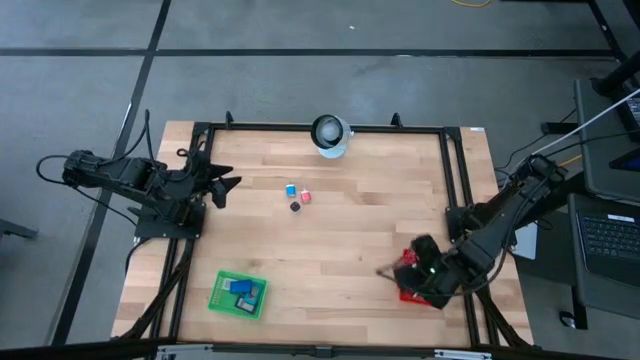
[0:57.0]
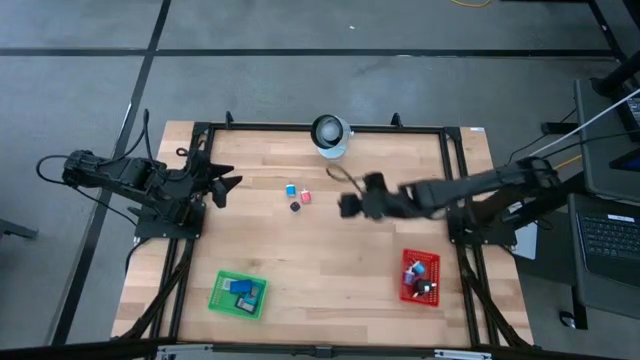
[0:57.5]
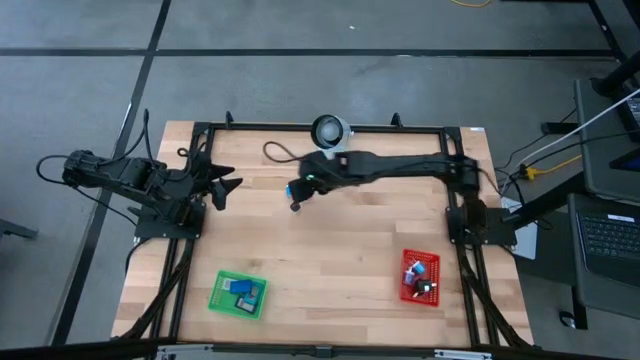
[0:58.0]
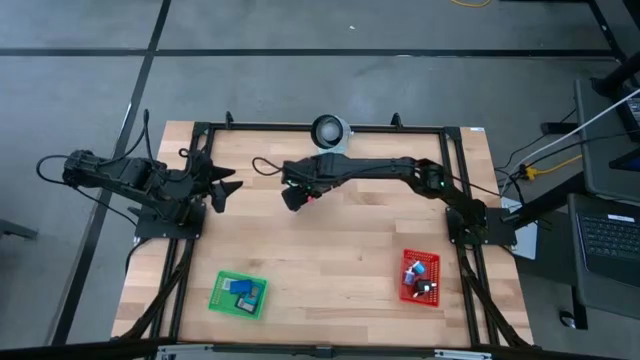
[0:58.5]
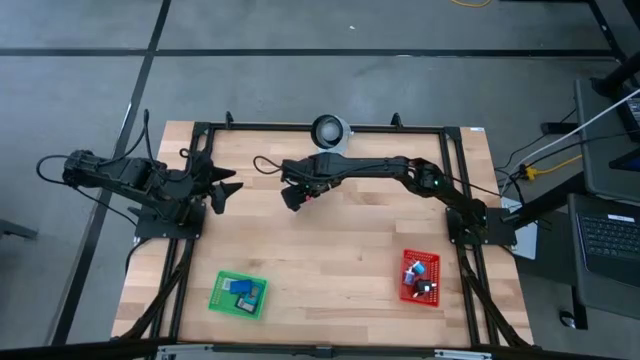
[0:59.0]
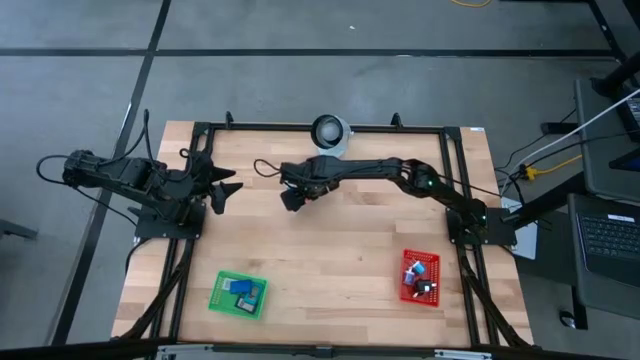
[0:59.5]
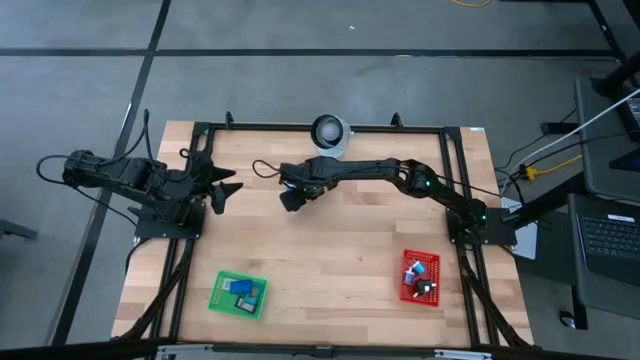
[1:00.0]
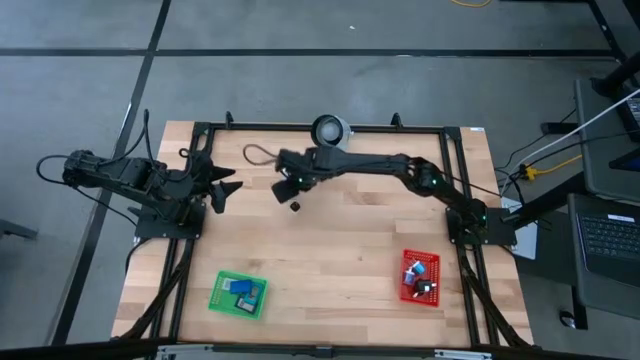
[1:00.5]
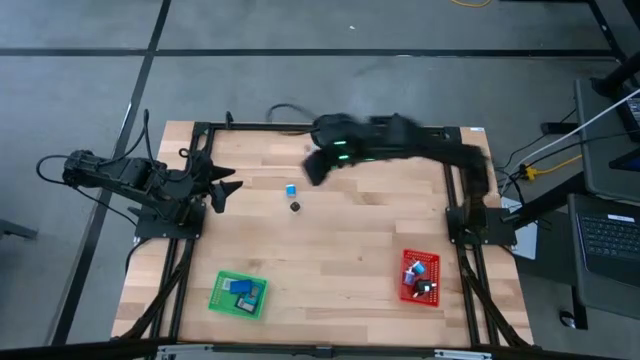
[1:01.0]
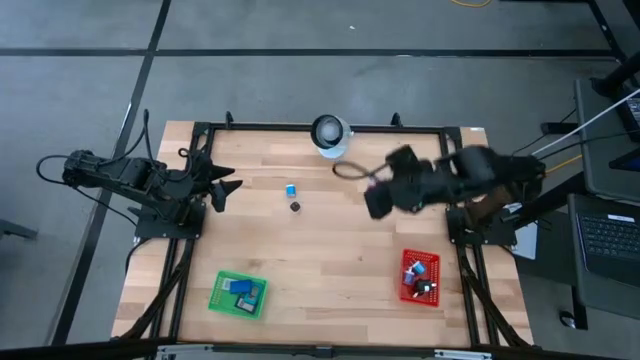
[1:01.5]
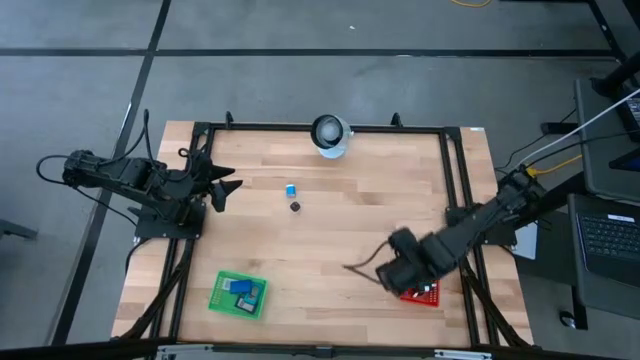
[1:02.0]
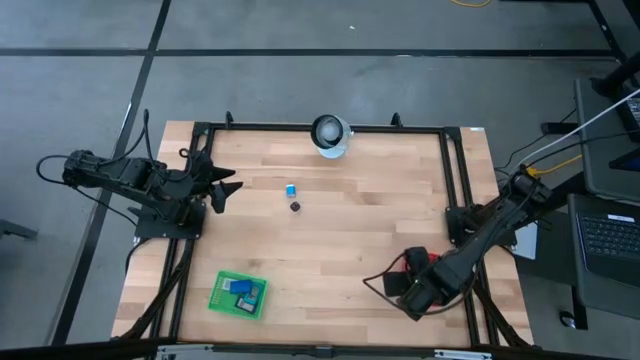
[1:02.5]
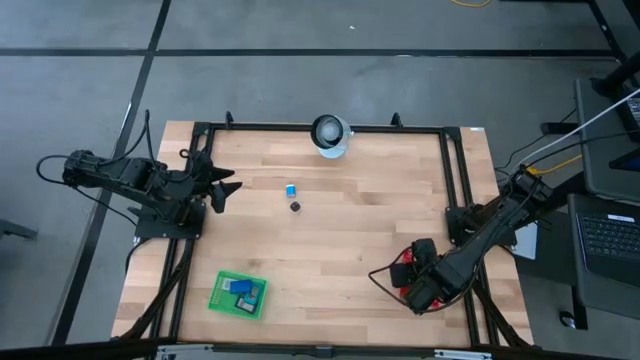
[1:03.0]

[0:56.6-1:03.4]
Task: Pick & Place Office items
Put the pink charger adapter into the red bin

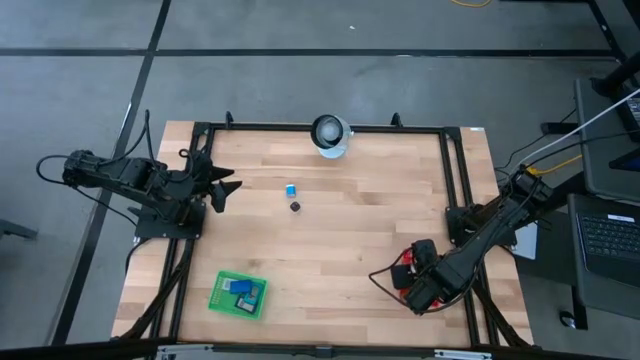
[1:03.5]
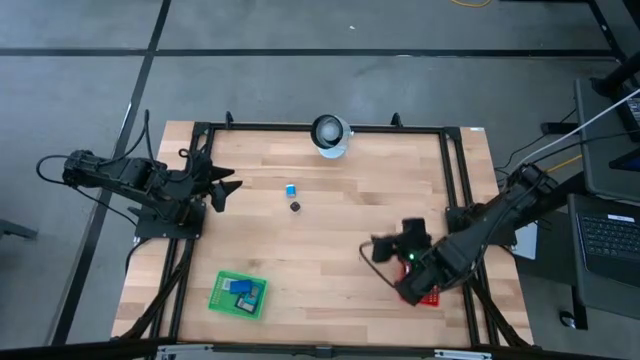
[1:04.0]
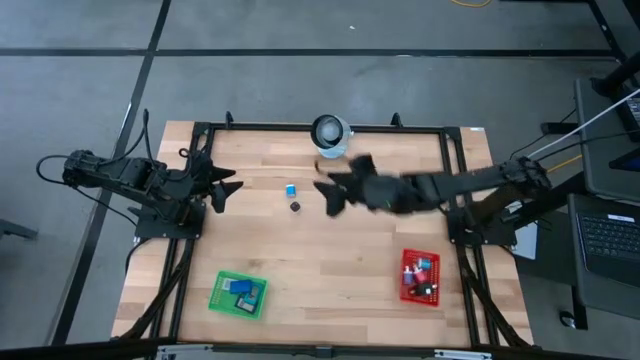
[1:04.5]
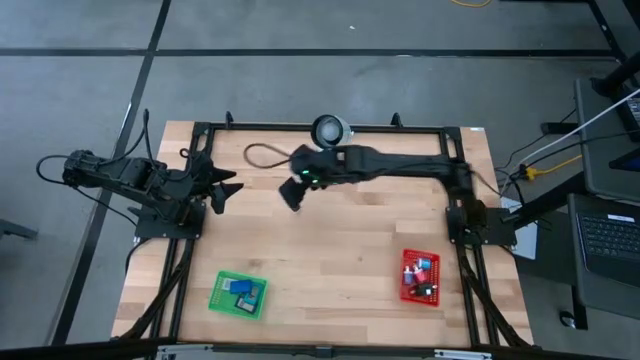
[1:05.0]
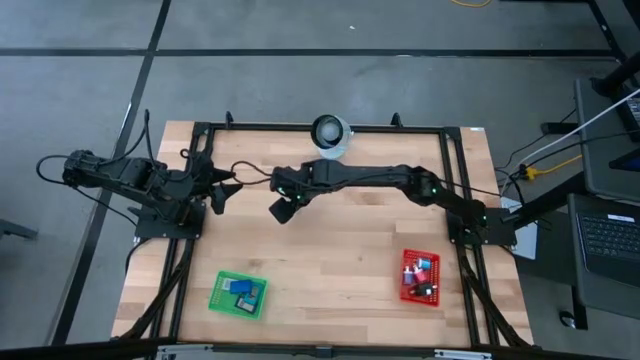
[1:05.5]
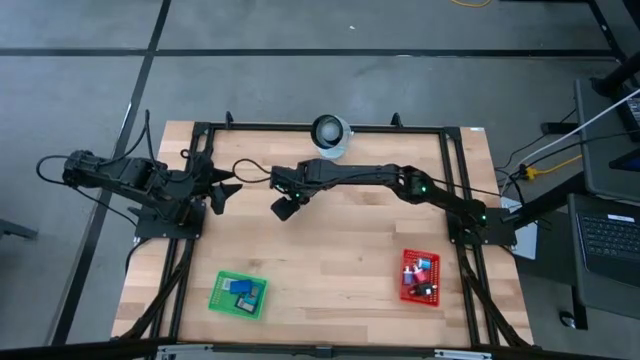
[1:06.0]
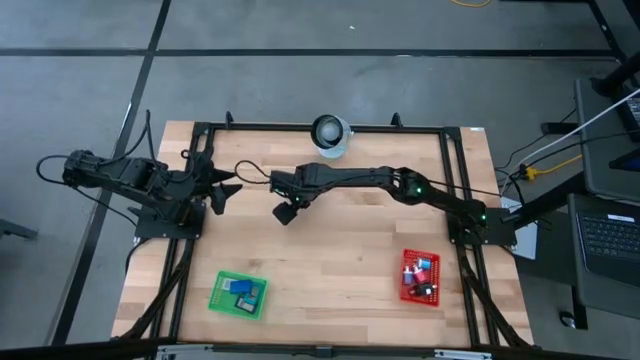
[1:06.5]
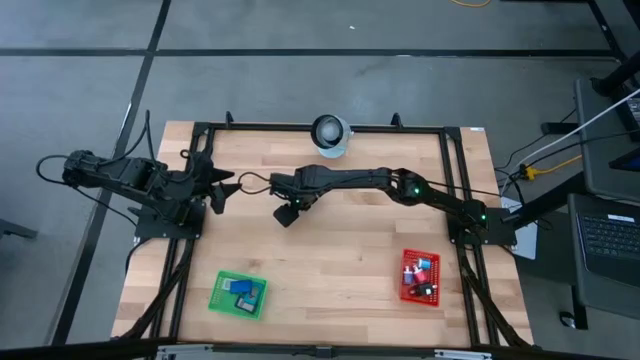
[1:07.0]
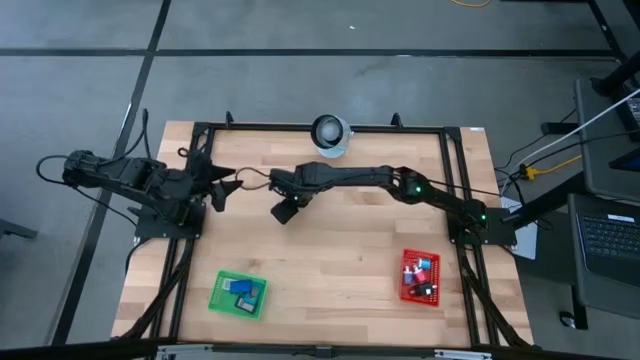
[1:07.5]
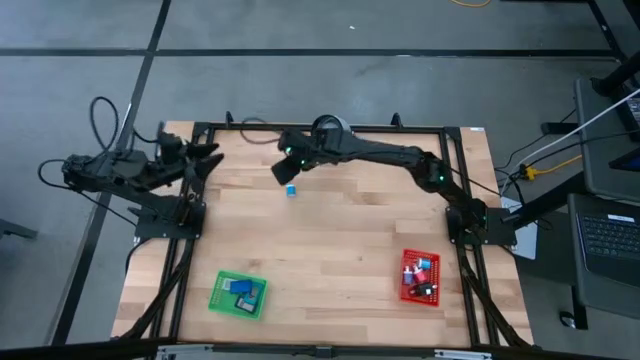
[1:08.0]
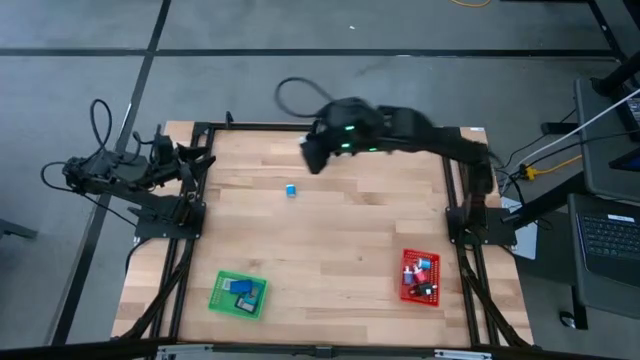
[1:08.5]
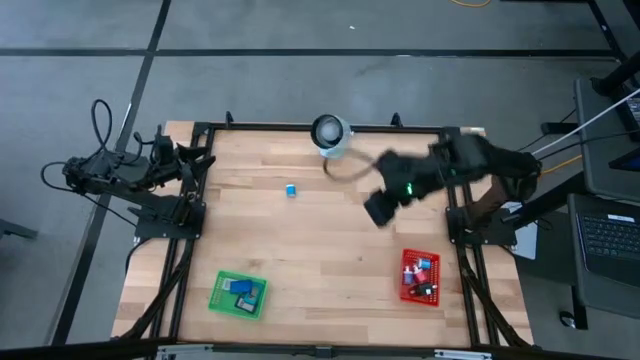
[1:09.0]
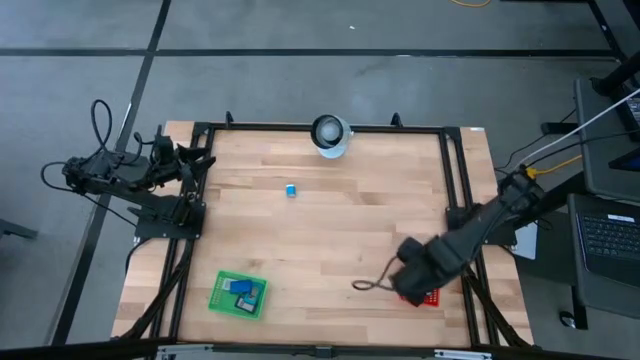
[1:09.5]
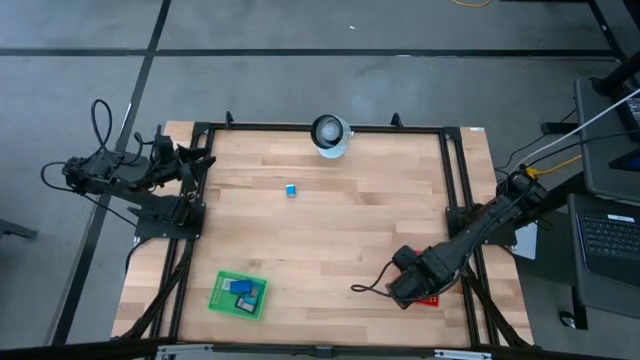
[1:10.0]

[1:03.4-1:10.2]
Put the white charger adapter into the red bin

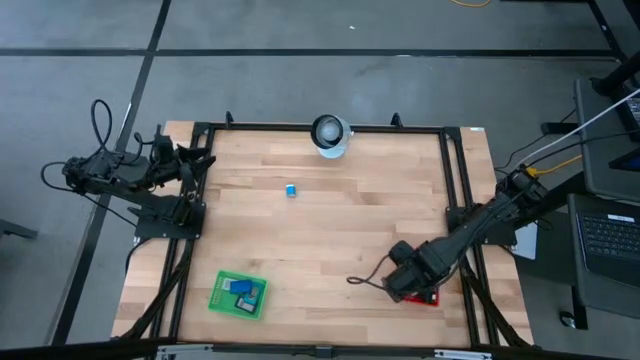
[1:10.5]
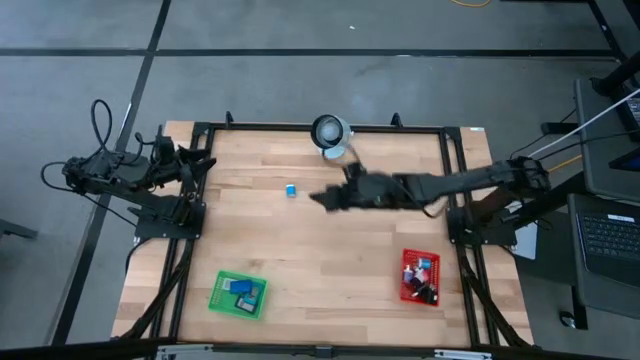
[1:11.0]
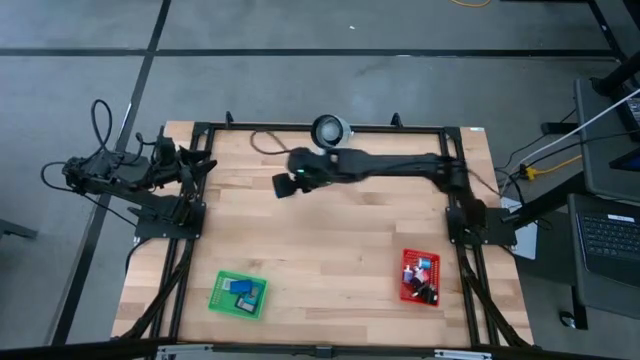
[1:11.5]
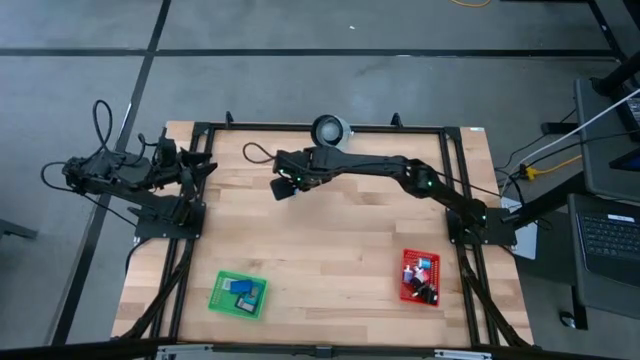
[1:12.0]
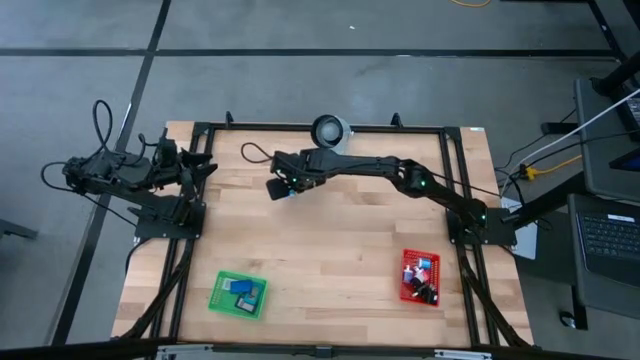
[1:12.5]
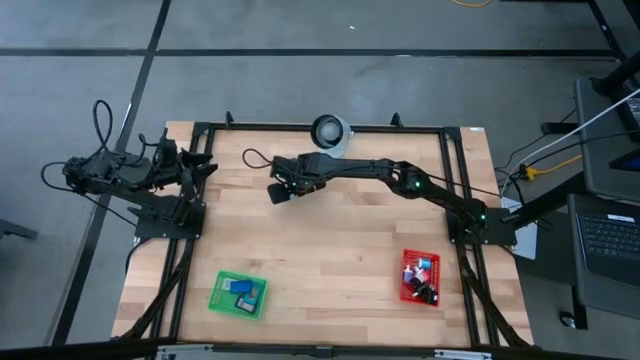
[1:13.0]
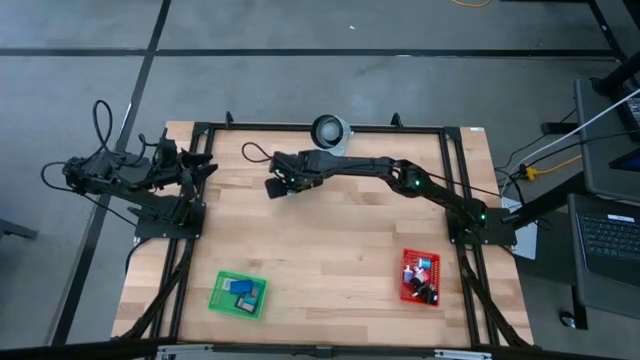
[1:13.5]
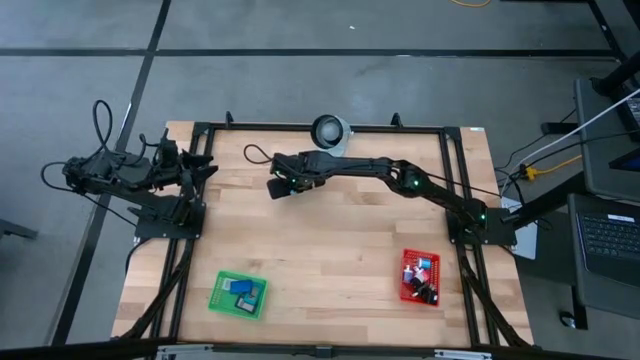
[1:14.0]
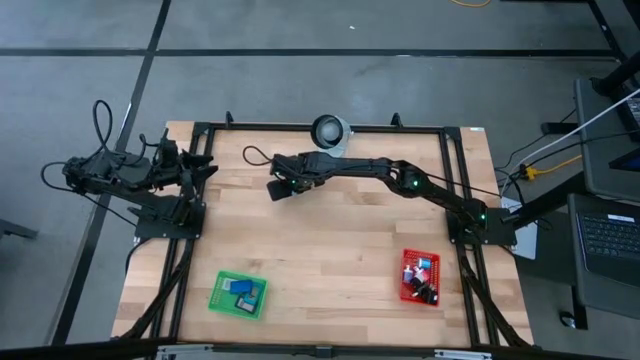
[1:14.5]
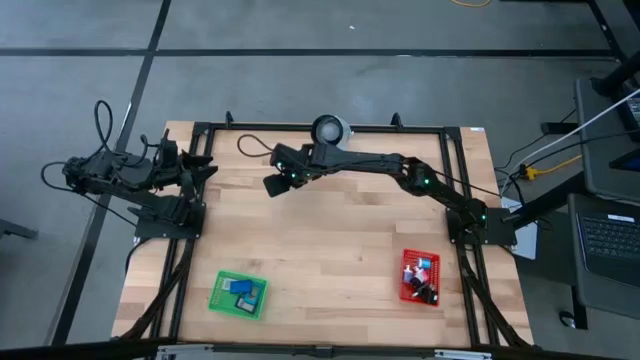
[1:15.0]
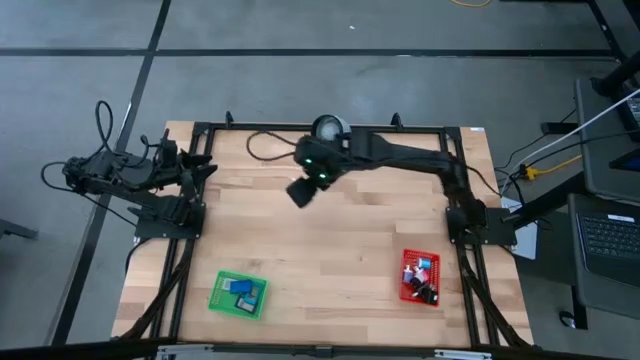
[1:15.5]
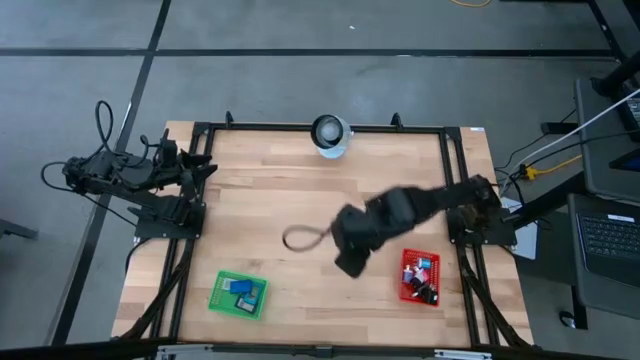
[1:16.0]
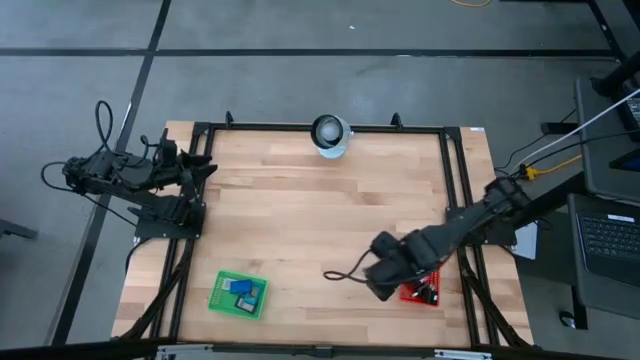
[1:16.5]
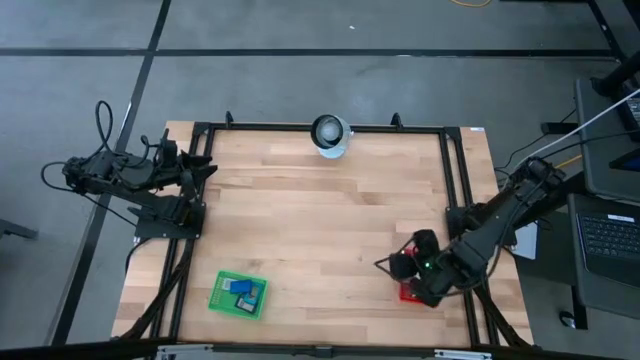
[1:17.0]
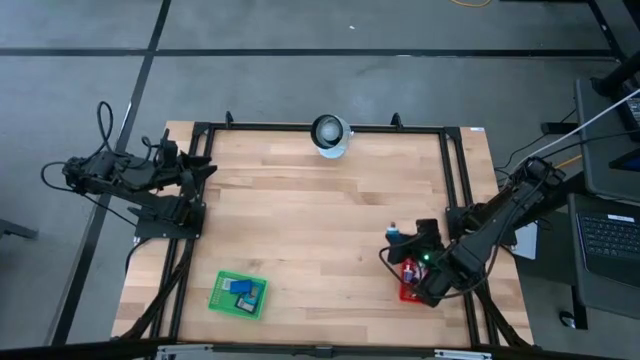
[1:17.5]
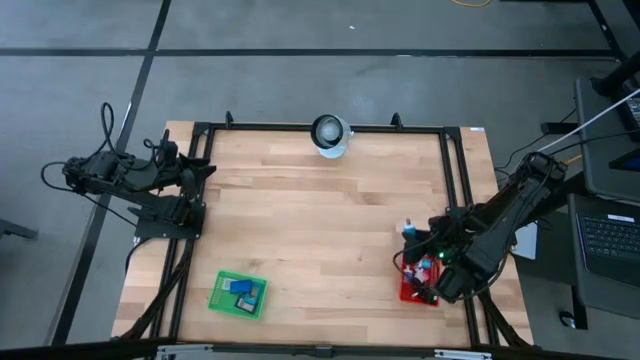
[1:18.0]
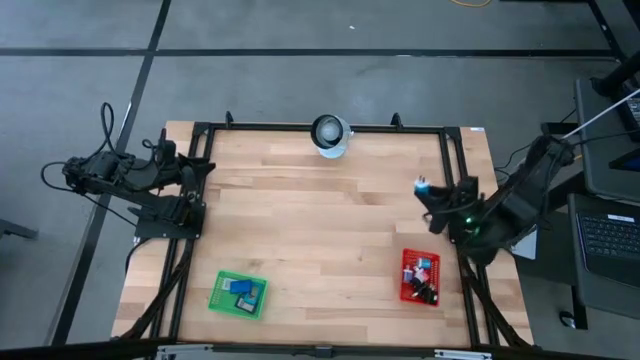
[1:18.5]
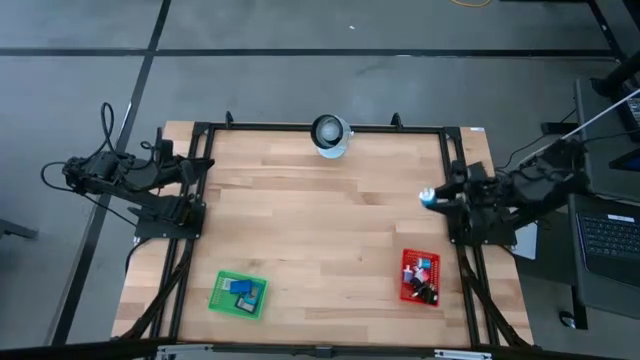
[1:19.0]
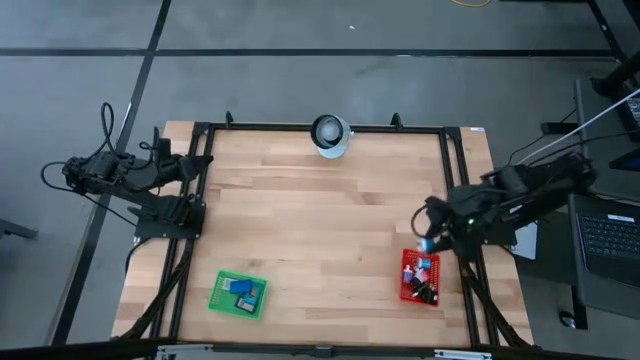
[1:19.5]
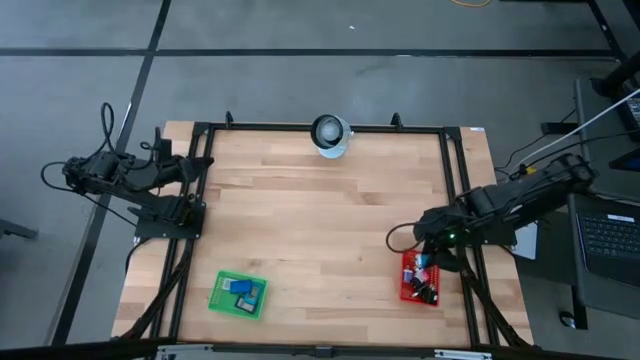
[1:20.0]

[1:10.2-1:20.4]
Put the light blue charger adapter into the red bin
